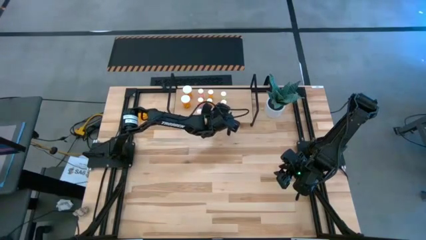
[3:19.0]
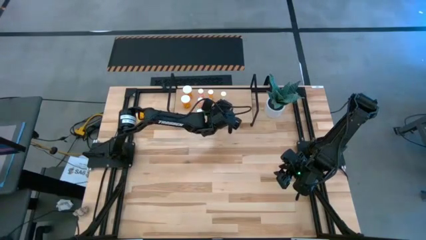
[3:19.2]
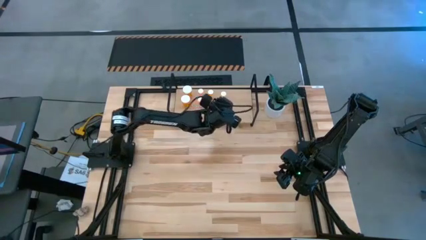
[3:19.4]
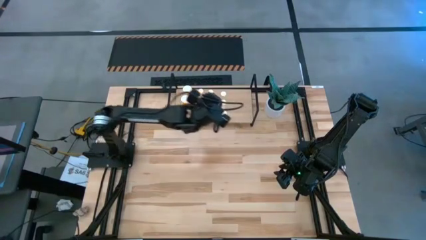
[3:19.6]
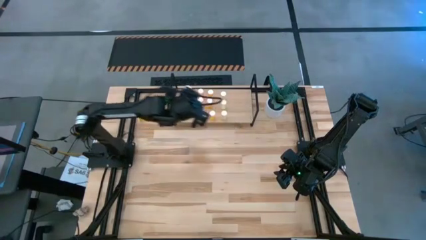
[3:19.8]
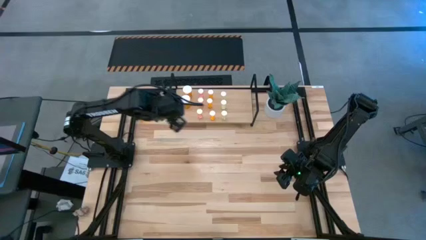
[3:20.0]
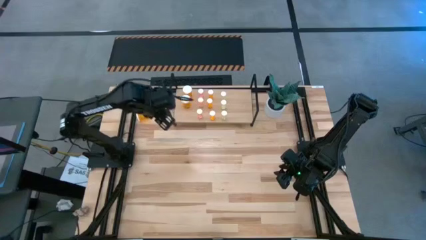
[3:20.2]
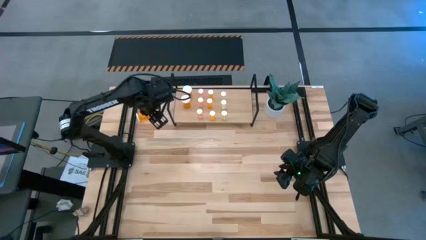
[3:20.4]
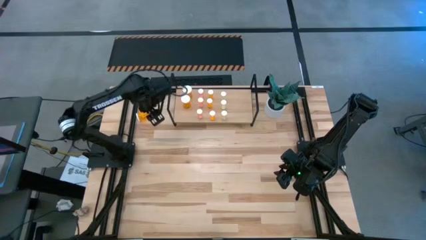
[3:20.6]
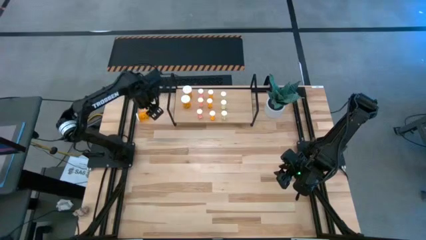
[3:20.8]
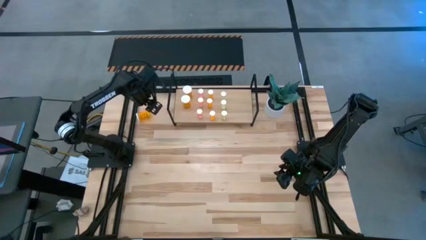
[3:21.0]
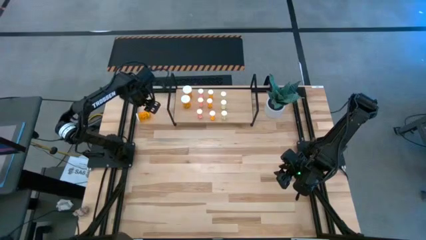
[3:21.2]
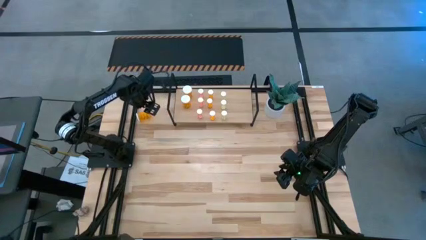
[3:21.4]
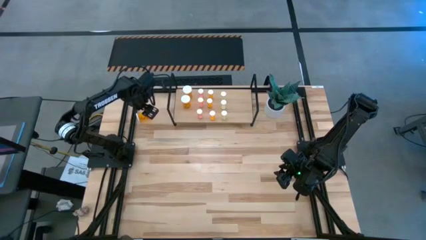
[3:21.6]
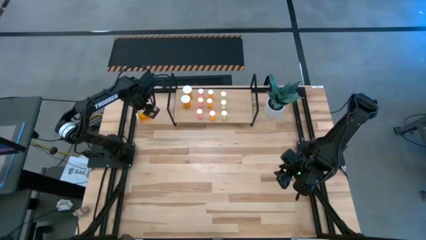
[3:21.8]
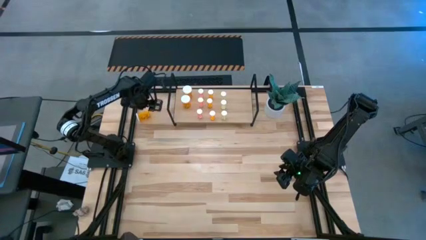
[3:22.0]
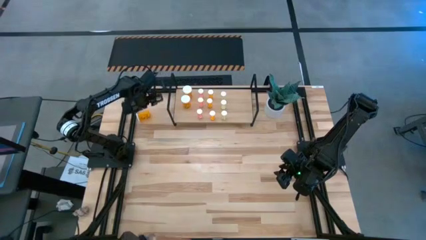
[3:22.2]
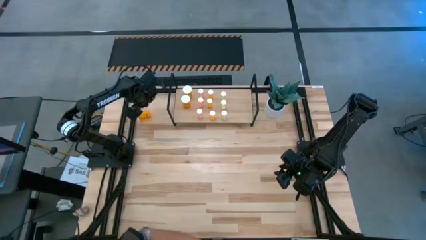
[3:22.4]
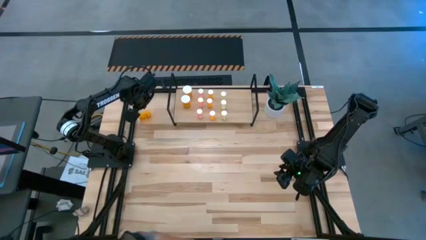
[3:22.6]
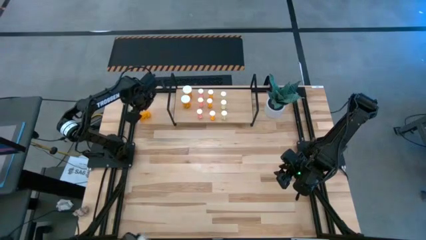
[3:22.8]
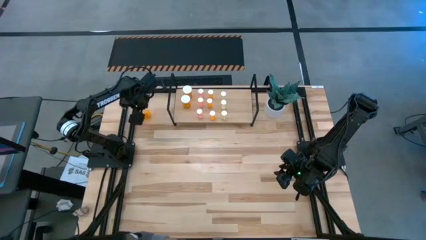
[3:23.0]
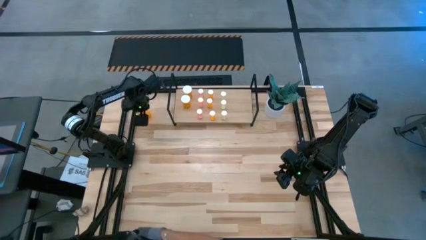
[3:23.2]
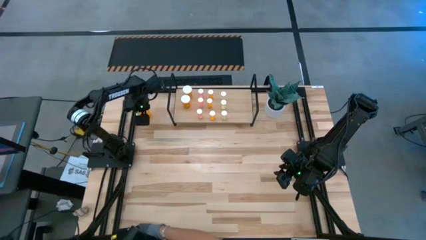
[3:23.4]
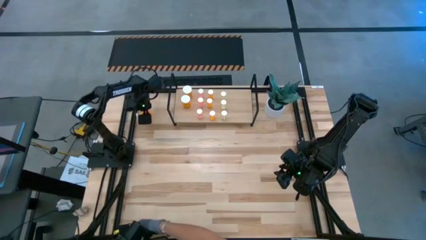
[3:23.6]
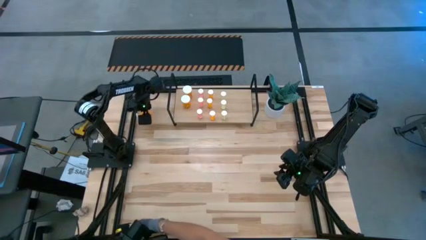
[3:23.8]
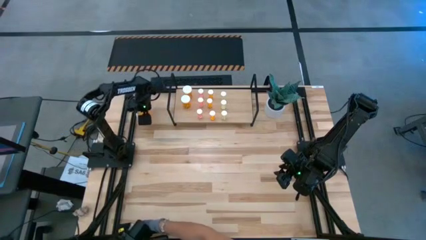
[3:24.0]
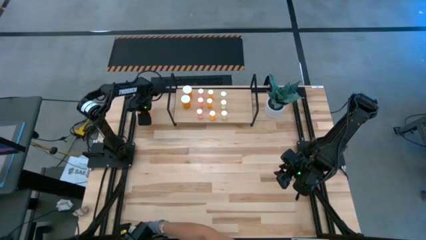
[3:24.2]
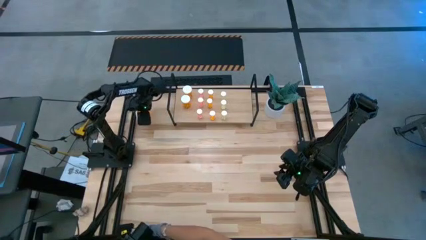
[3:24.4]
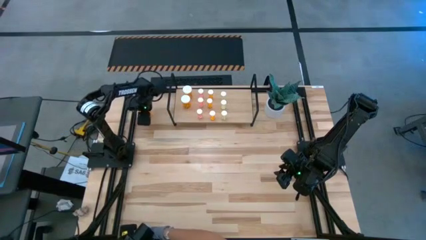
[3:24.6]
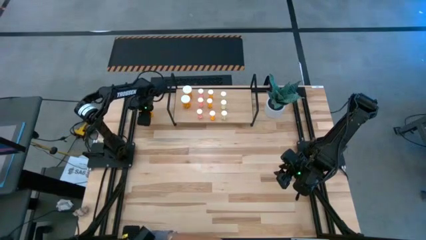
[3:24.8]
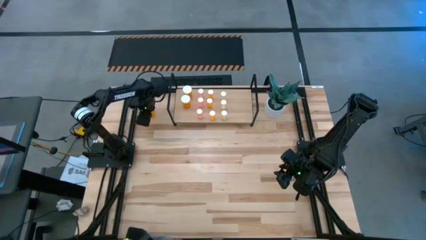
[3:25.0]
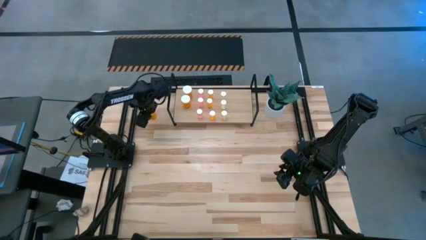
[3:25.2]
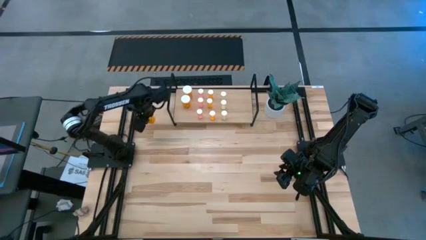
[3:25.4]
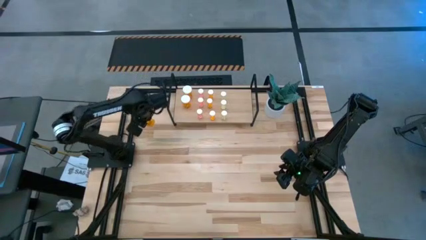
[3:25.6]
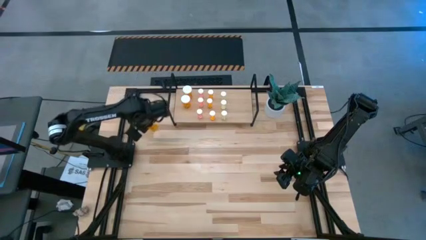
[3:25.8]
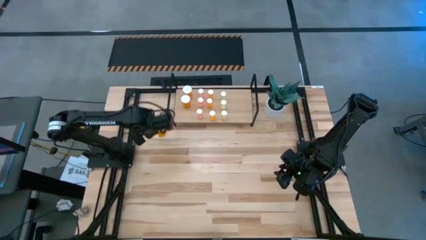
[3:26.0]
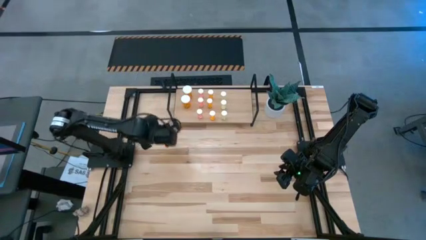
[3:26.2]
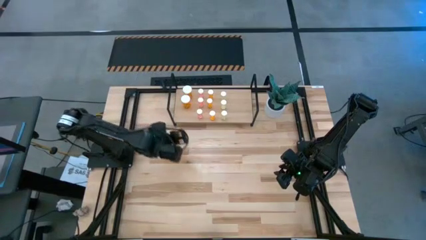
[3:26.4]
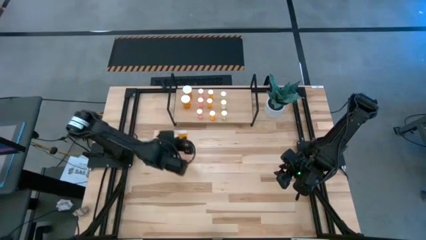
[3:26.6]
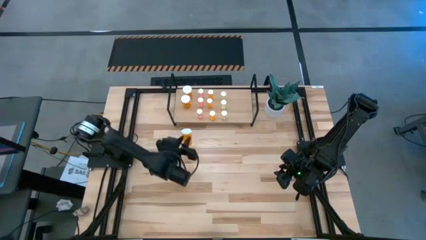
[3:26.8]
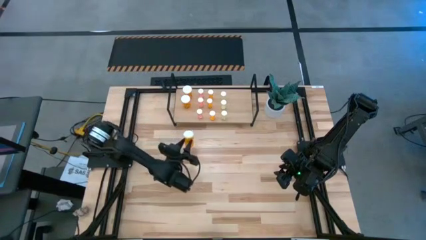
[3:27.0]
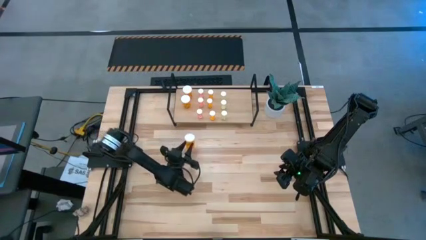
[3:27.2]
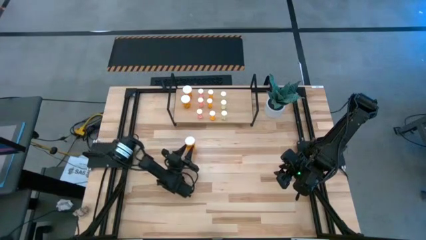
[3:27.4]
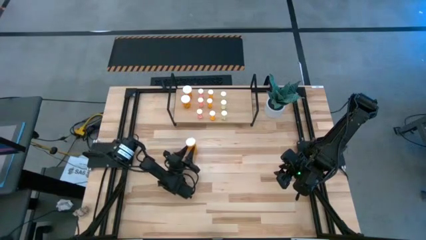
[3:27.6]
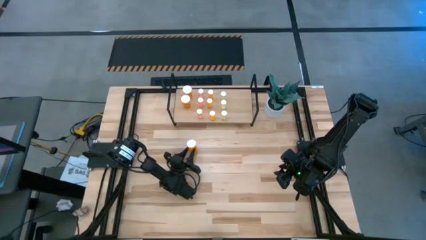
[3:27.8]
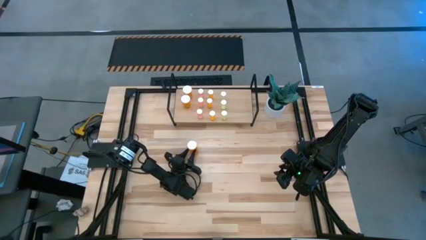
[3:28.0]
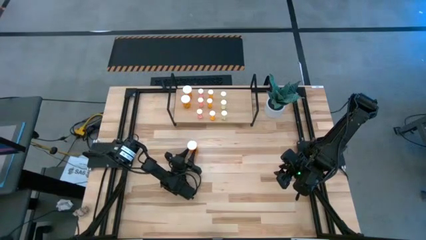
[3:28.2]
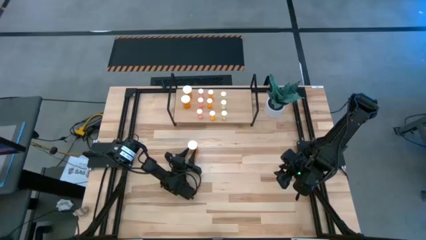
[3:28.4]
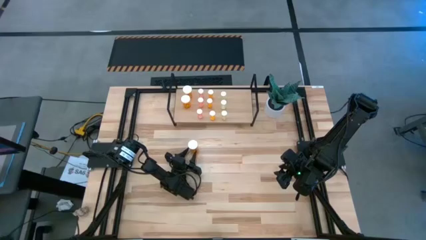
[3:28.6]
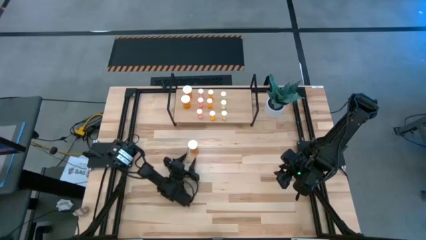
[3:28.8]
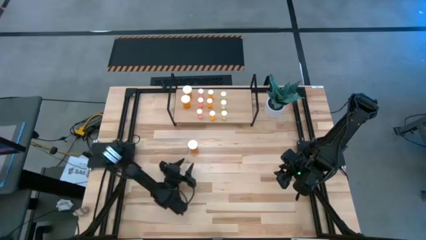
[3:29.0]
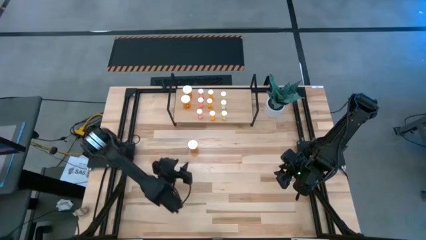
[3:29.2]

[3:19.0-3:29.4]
Task: Pick and place medicine bottles onto shelf by color
Put the big orange pill bottle on the shelf aligned with the other big orange pill bottles

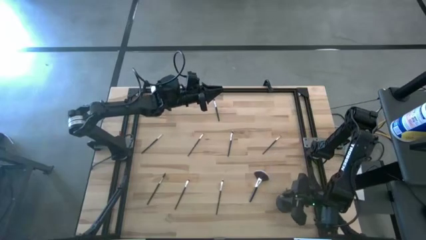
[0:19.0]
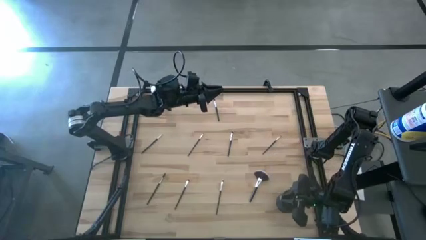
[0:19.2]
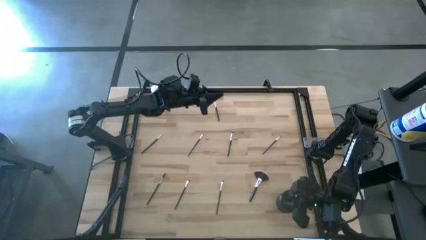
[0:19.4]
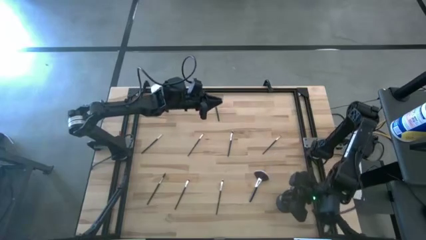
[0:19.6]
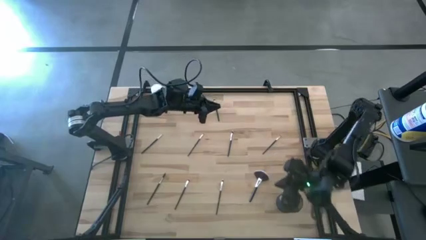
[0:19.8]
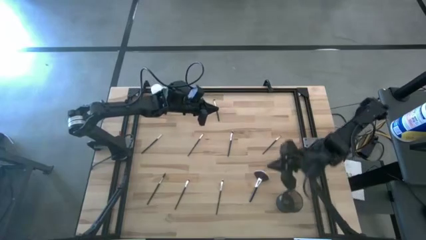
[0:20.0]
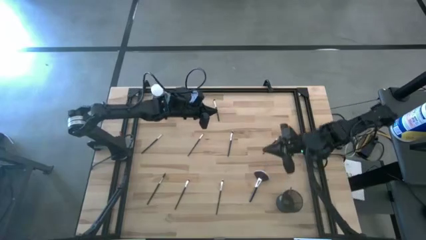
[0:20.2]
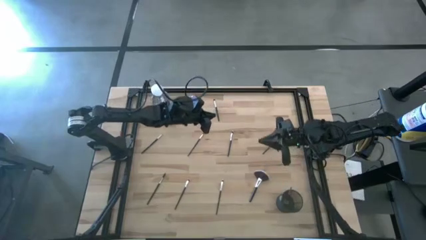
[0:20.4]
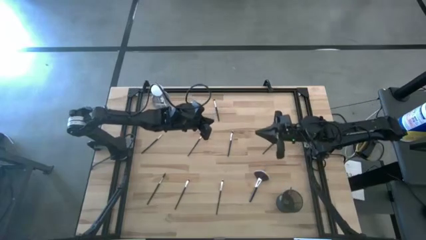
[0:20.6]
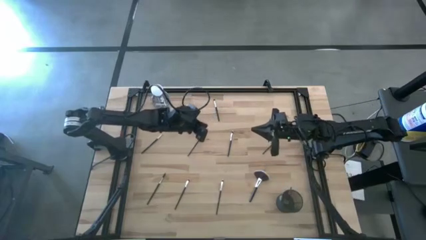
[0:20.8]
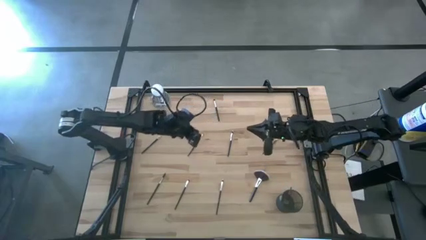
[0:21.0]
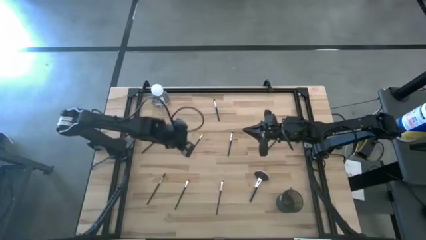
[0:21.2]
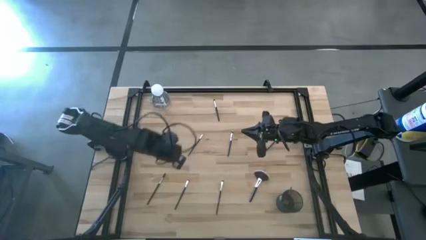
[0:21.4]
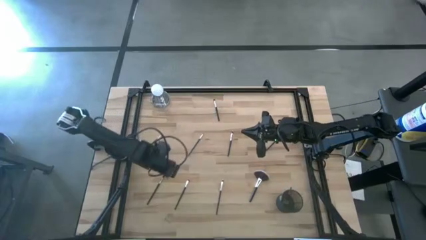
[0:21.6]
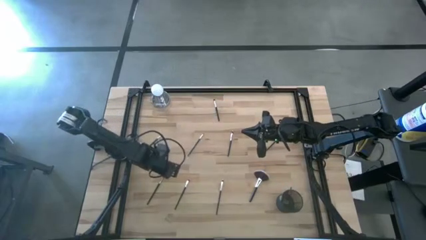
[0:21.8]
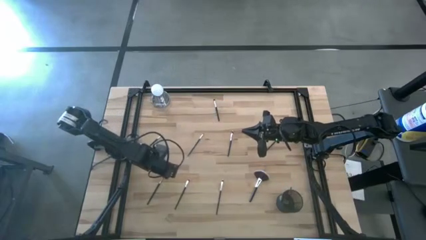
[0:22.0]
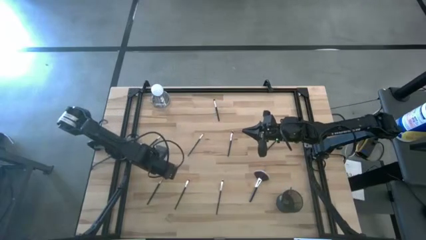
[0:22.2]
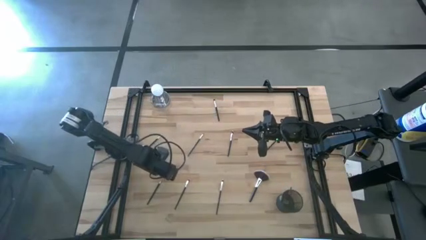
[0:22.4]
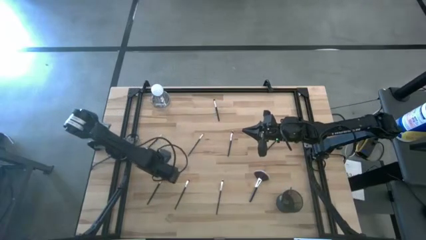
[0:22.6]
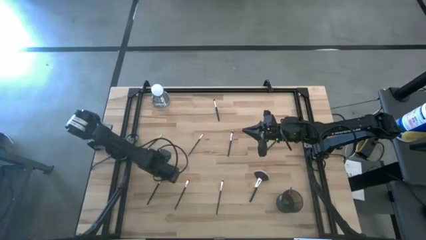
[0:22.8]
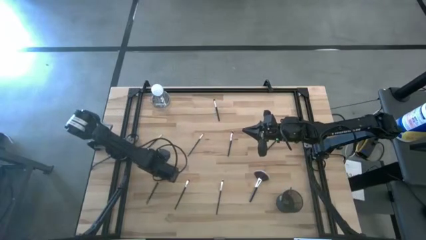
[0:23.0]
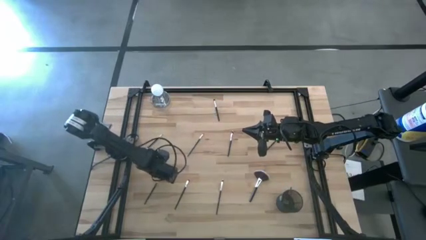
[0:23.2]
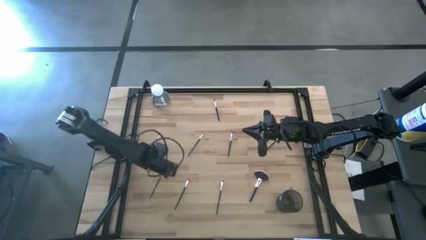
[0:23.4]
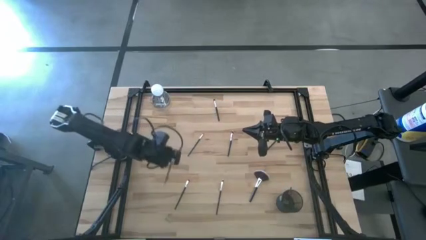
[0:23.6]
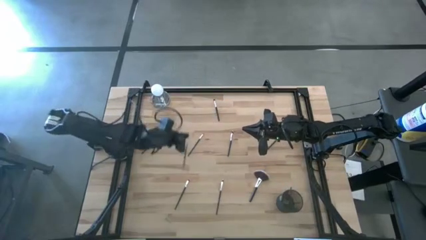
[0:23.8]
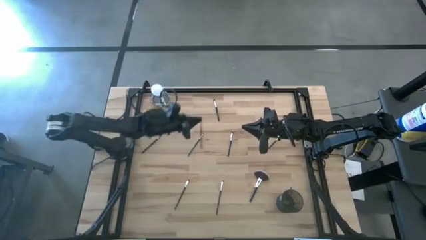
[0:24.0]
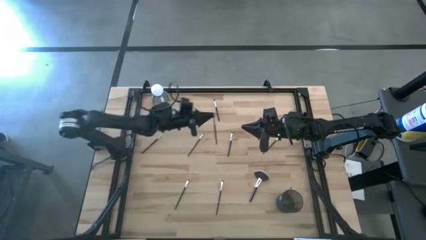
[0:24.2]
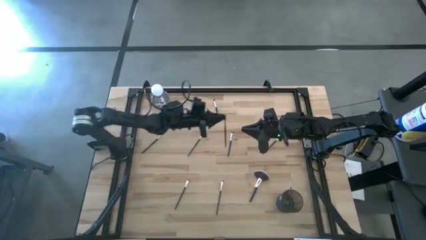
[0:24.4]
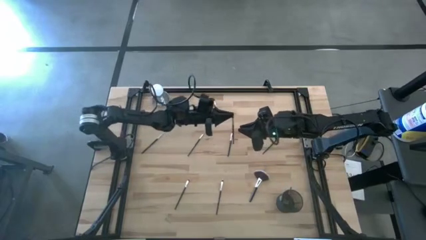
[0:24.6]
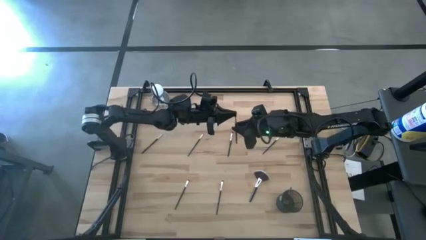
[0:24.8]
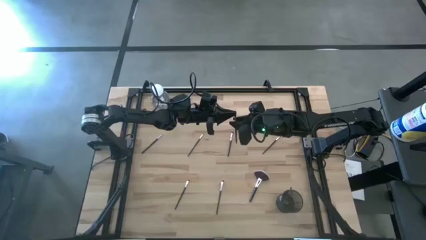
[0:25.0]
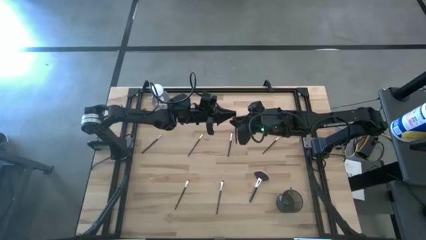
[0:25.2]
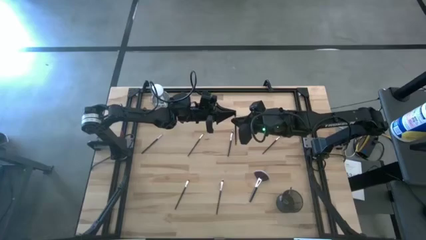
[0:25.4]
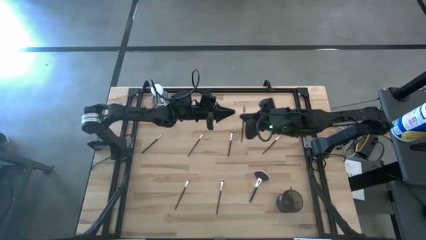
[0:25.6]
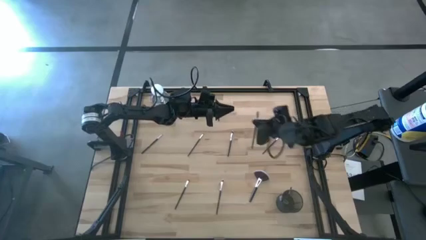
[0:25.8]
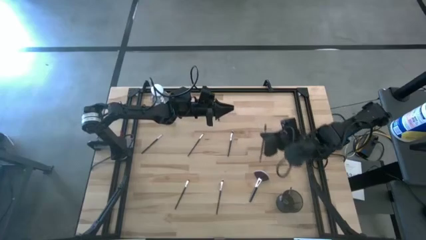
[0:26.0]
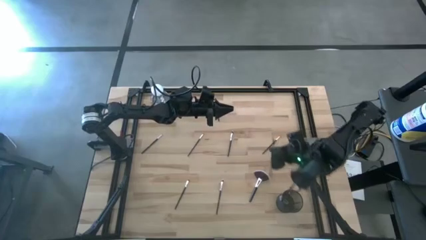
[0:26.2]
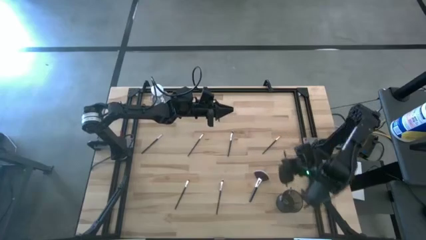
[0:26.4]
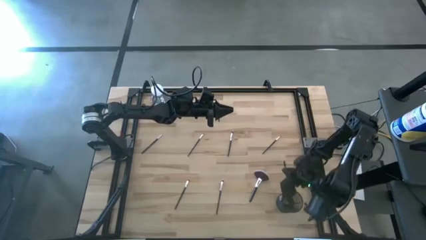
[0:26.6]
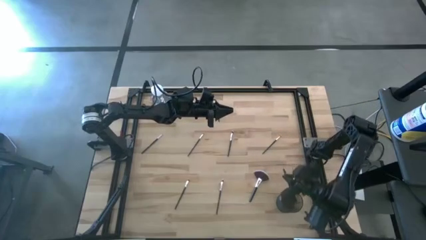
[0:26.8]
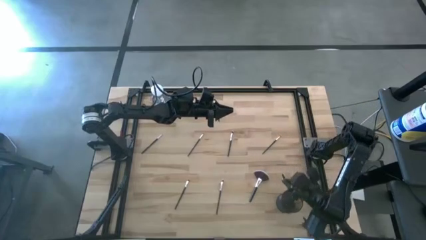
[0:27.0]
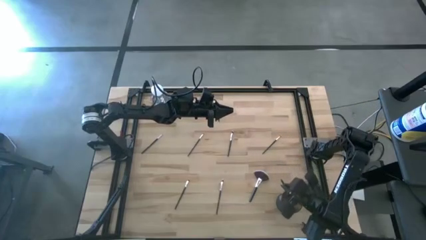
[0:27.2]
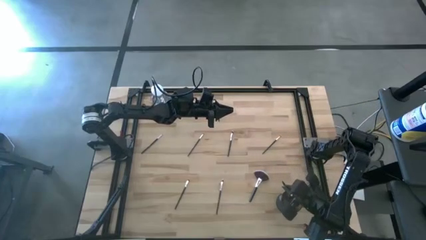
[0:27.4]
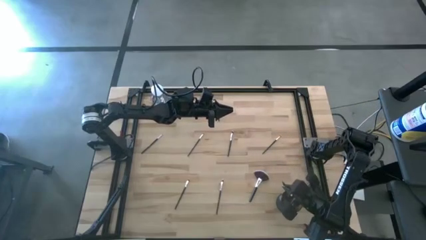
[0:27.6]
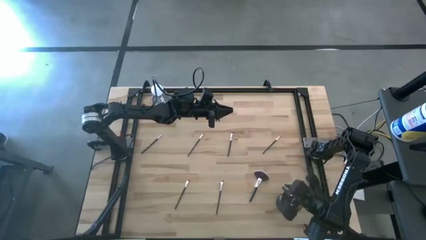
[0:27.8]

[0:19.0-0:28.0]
Task: Put items in baskets/containers
Put the lash brush into the brush holder
